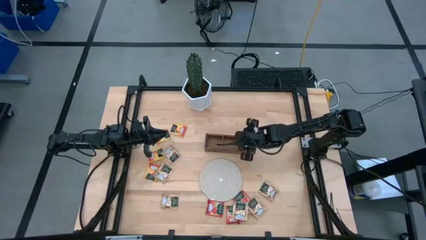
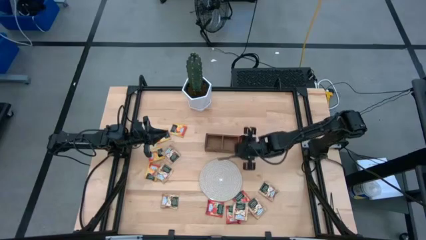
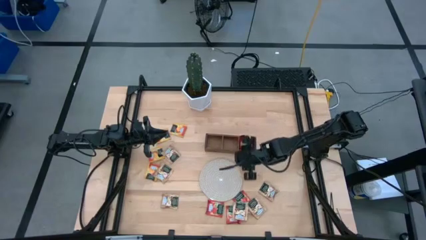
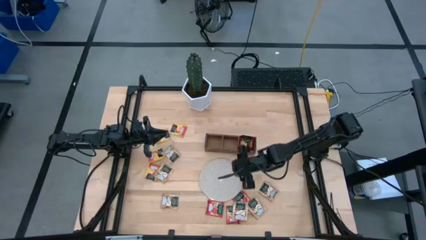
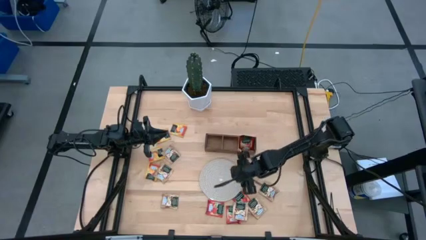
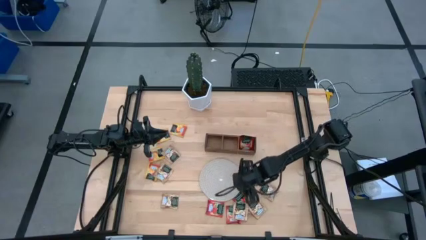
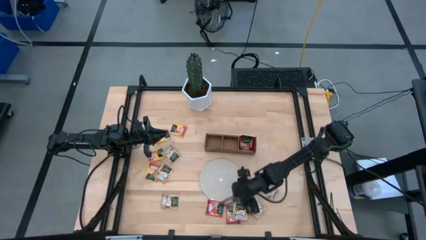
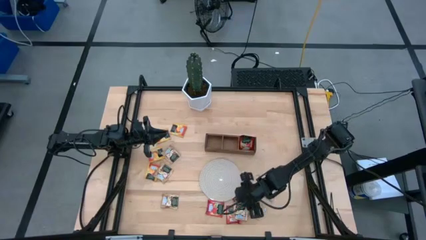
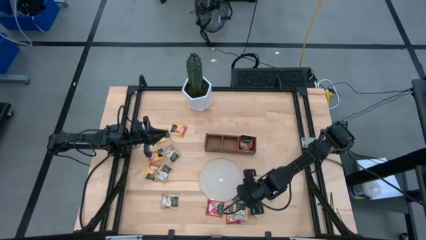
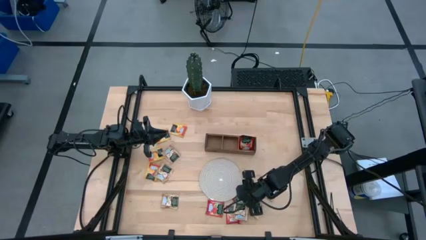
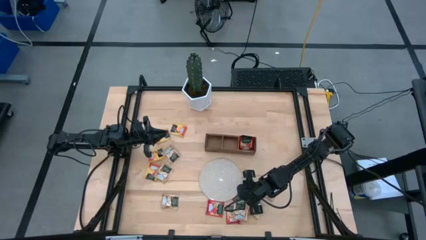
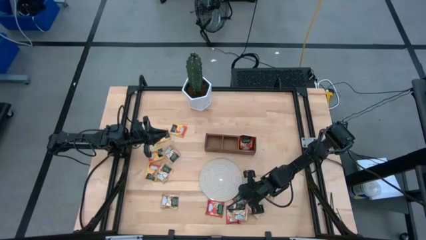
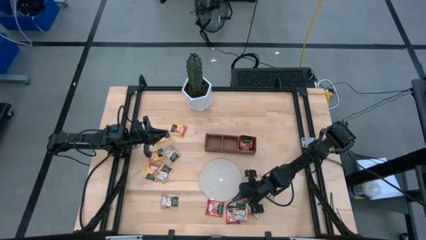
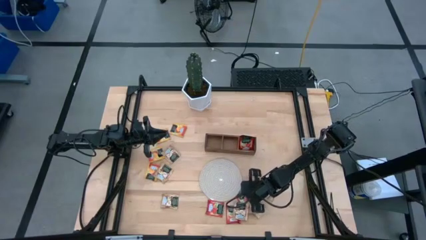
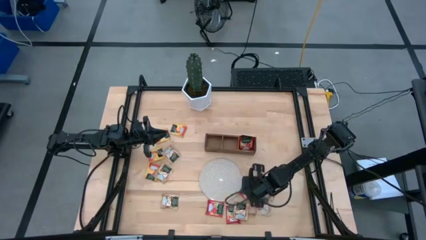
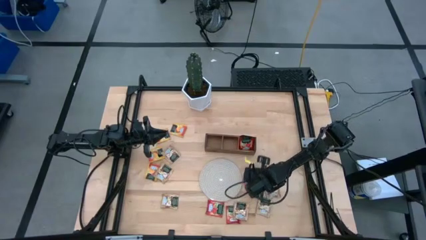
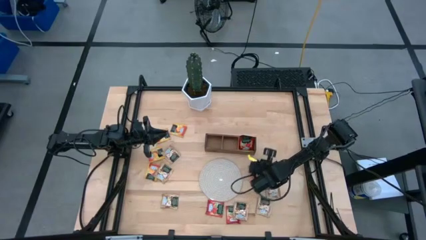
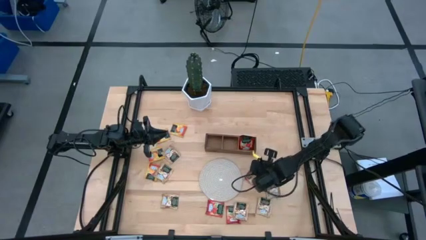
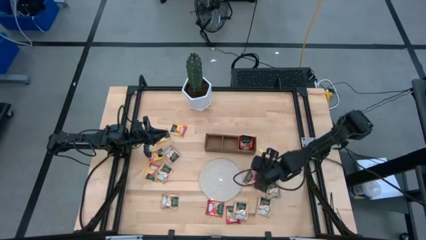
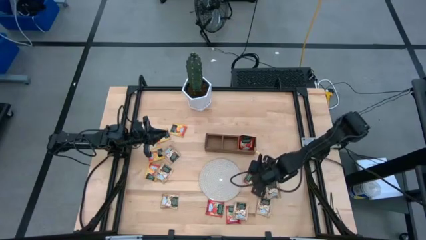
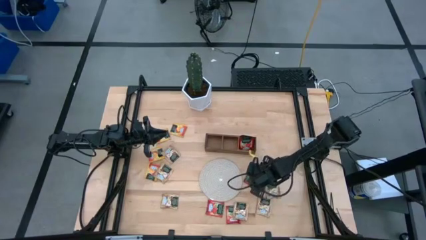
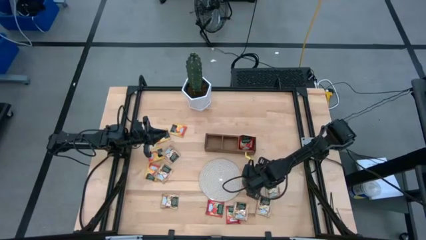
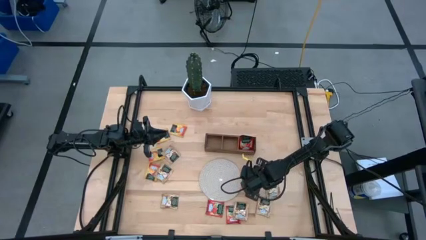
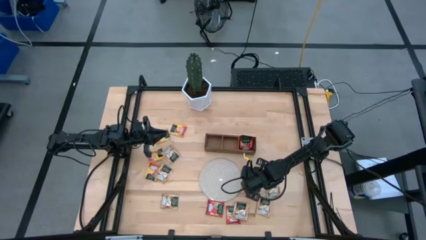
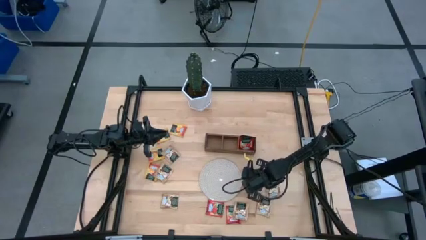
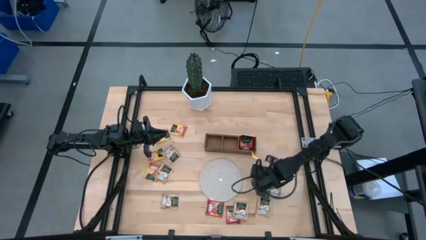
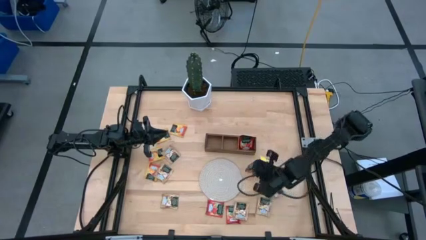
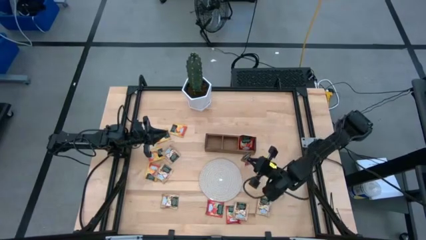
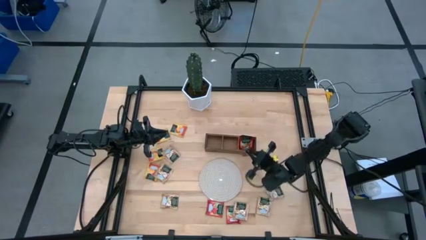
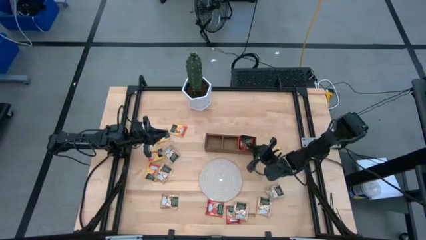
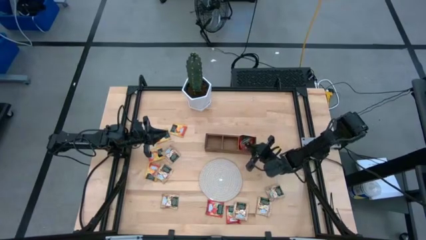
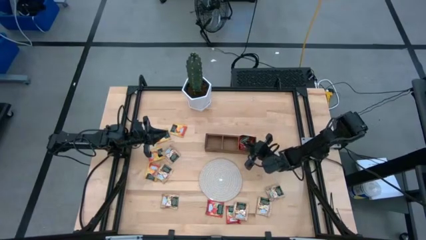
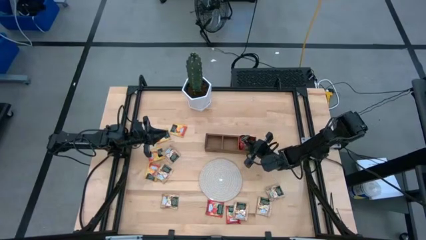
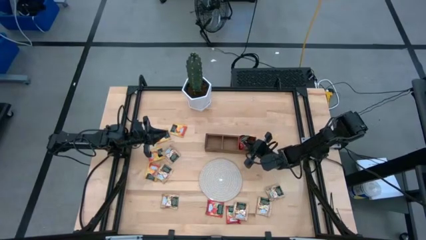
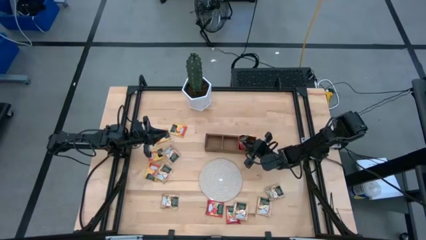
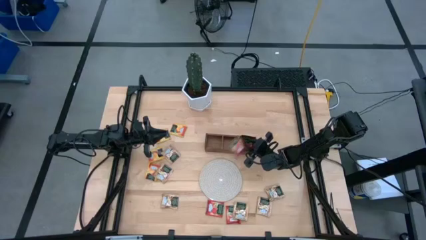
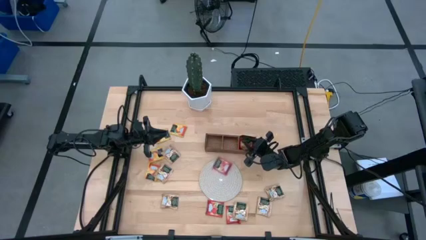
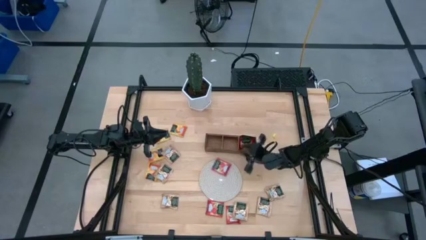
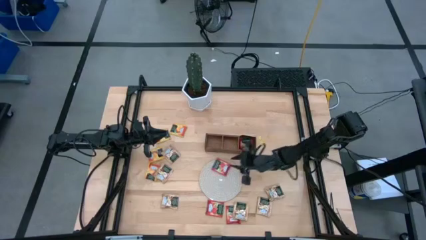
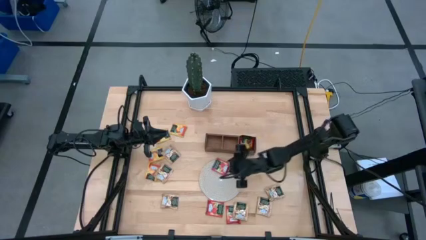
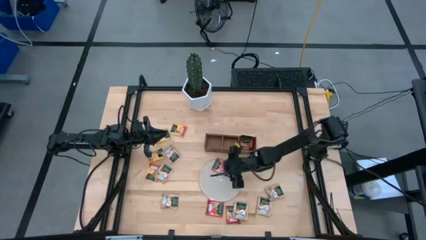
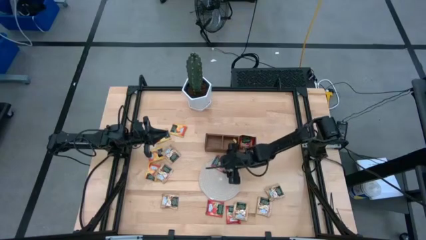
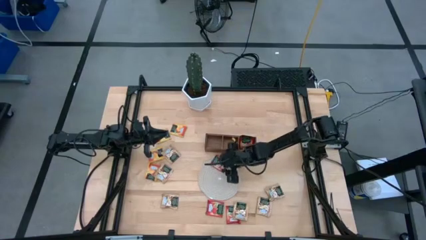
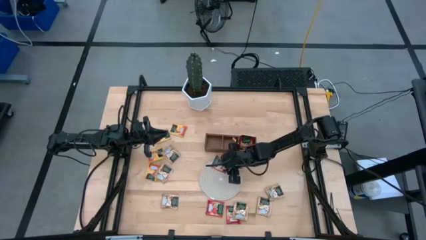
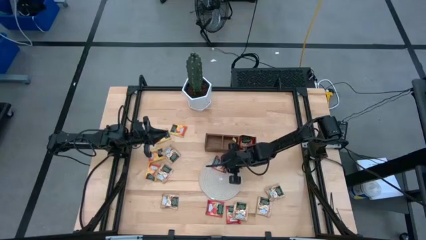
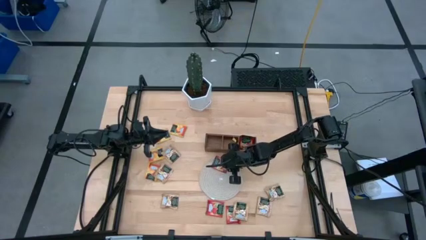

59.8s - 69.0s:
Task: Pick & Place Tea
Put the red tea bag into the right section of the wooden organizer

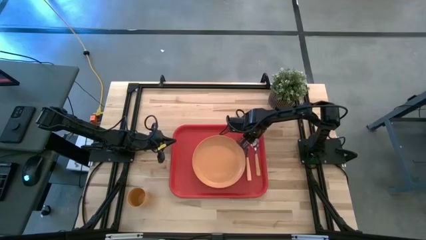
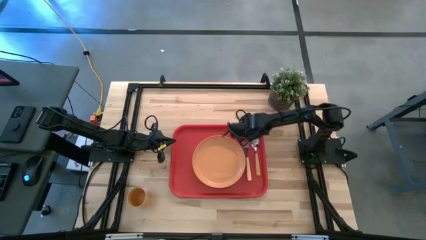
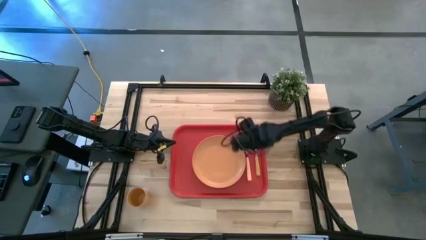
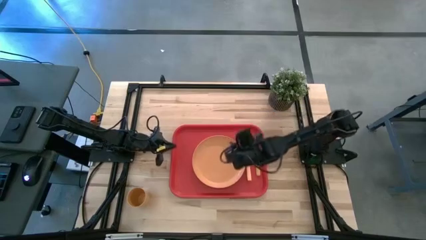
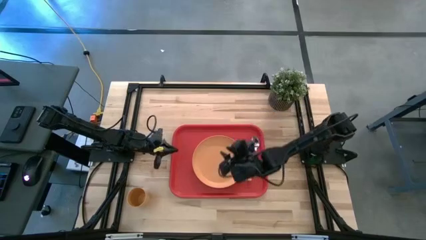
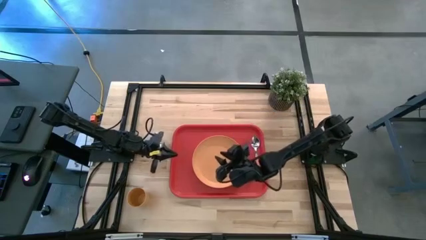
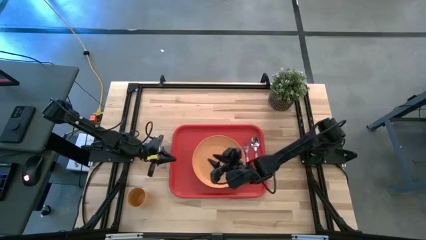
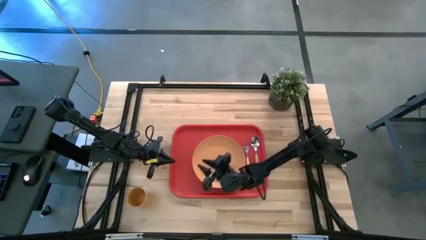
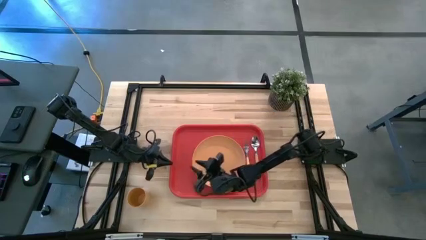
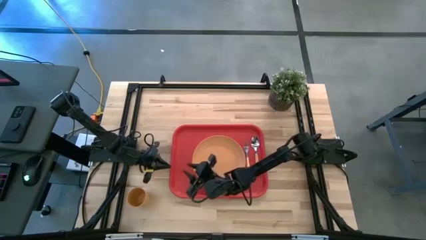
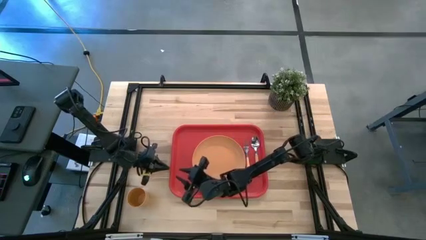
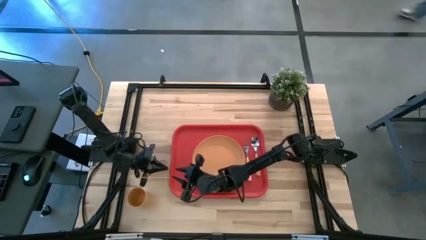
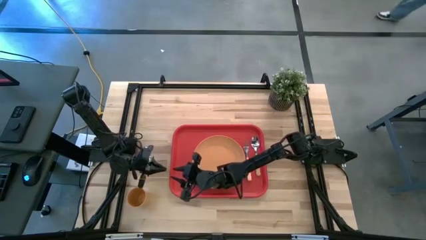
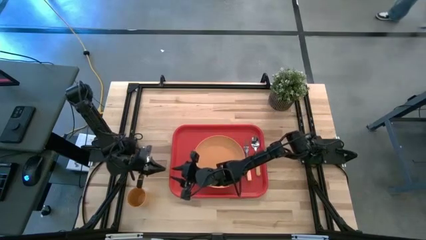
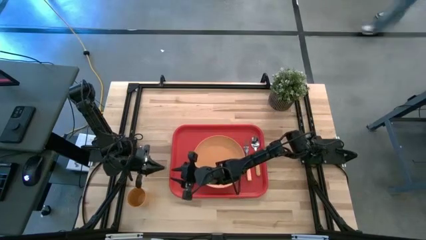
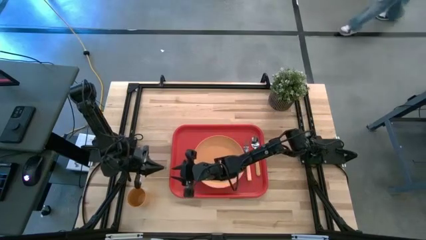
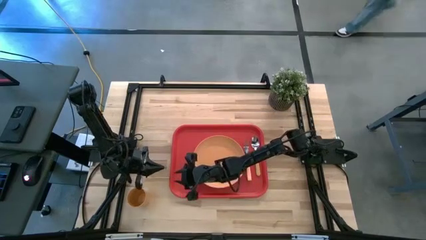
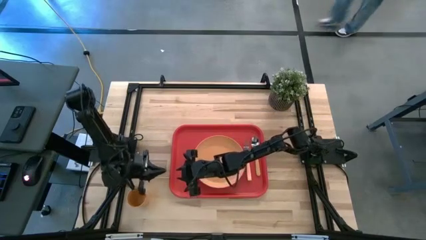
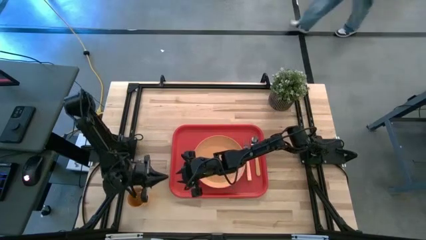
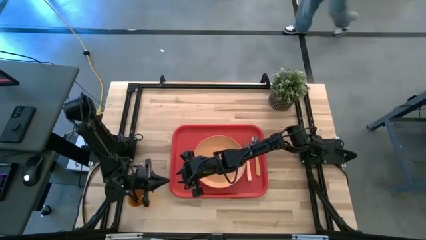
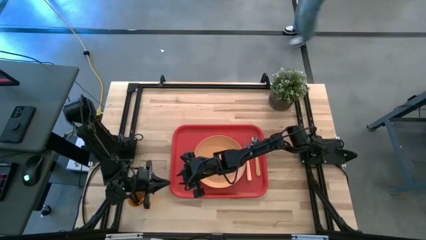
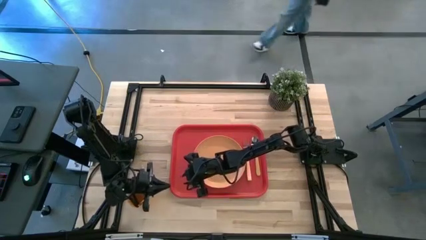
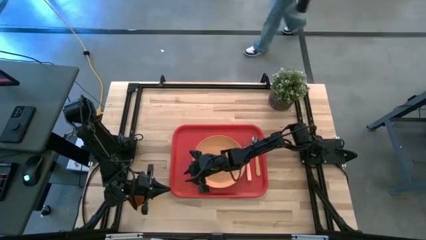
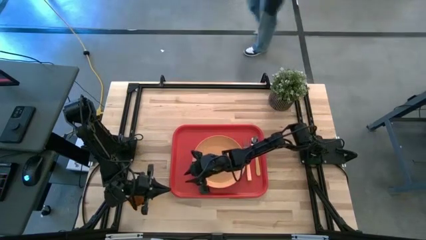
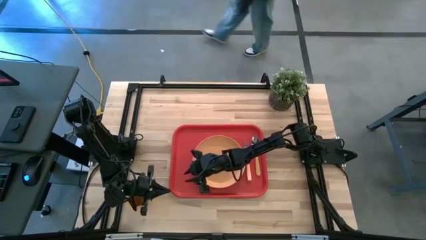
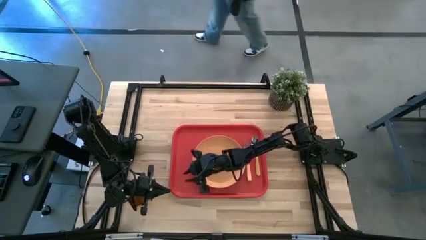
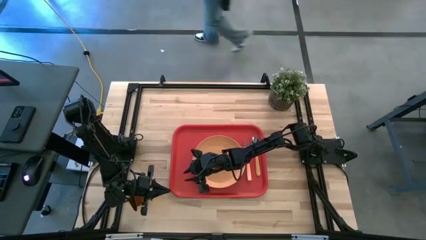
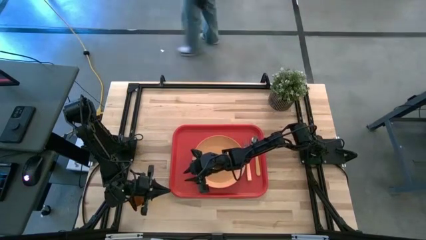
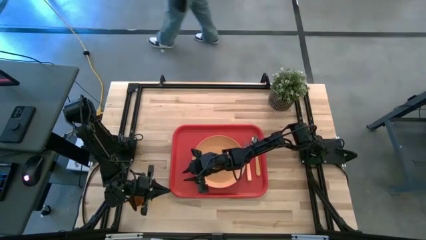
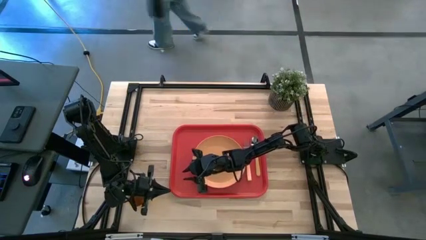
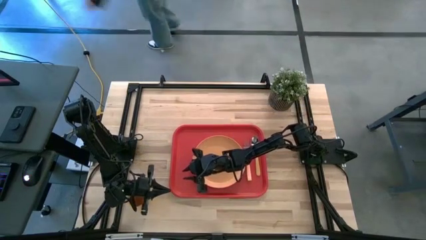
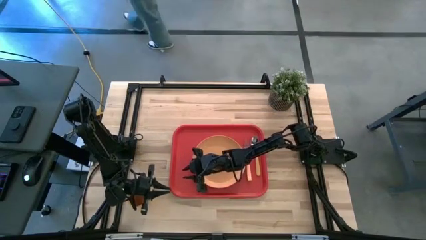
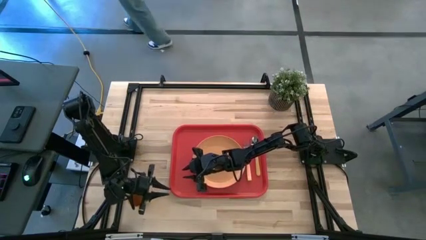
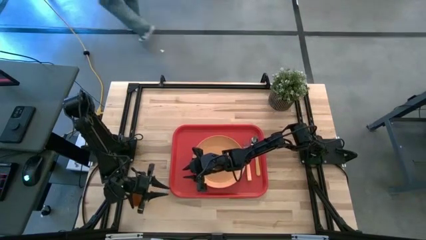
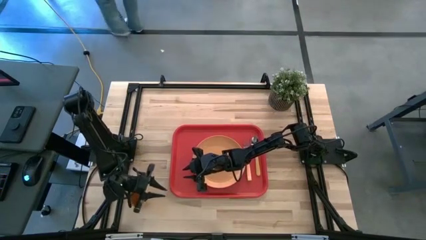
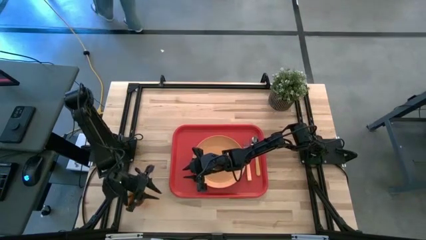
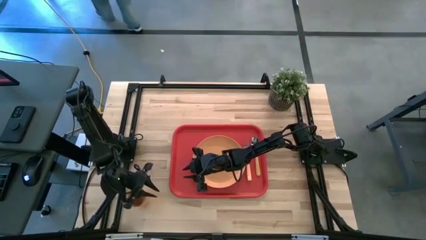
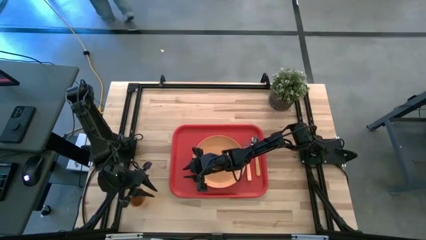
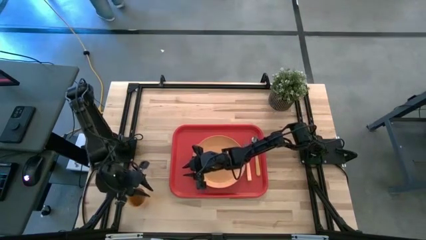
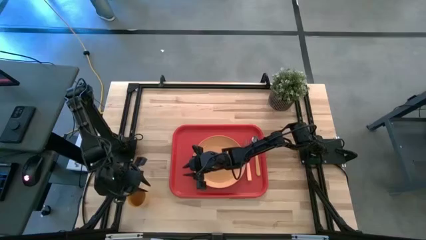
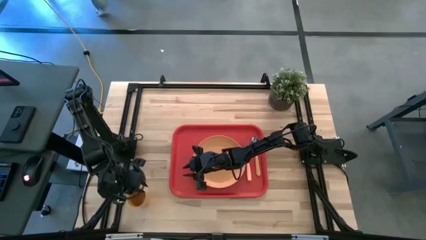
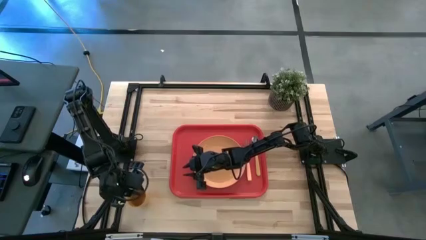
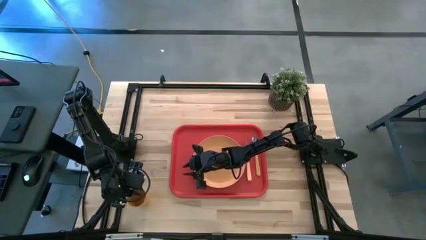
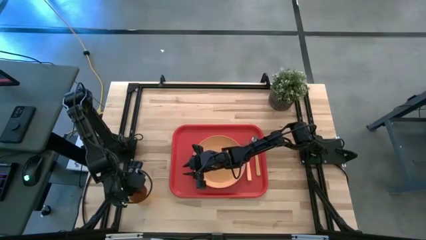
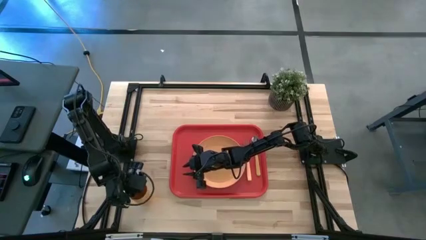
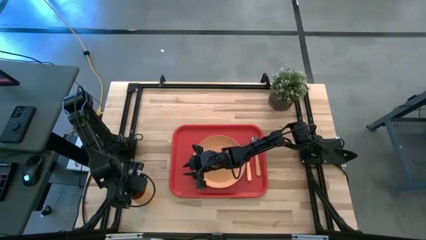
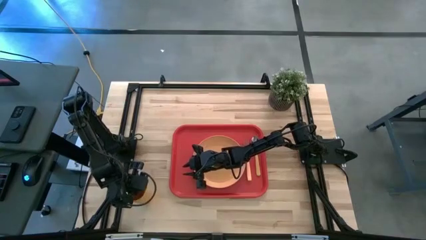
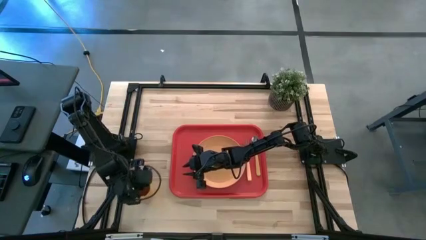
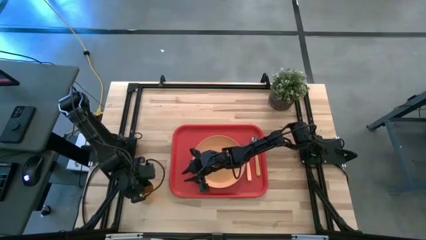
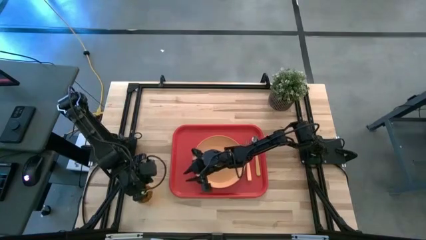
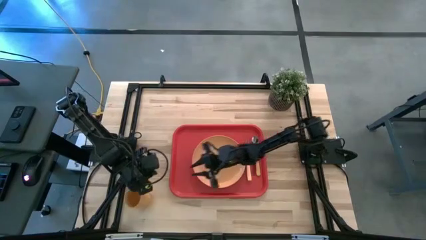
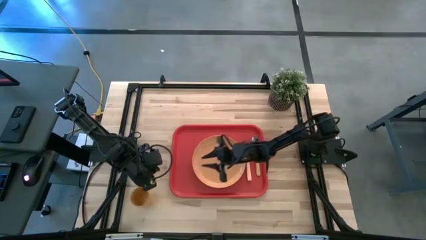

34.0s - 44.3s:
Task: Pick and place plate/cup/fork/spoon on tray
Put the orange cup on the red serving tray to the top left of the orange plate
